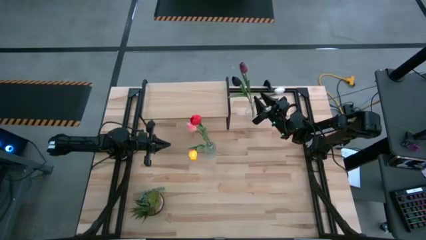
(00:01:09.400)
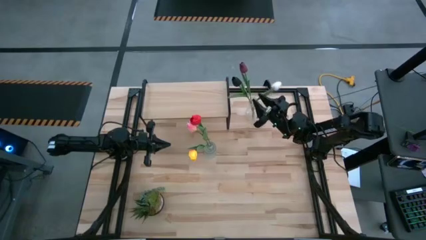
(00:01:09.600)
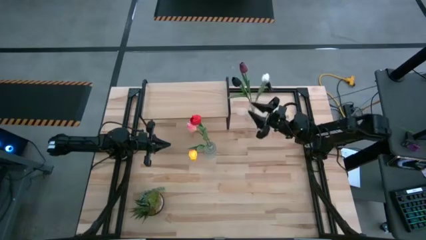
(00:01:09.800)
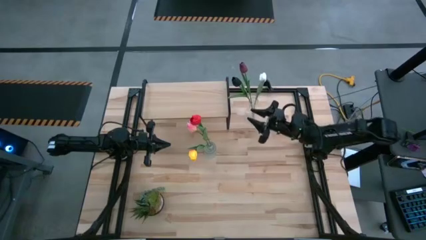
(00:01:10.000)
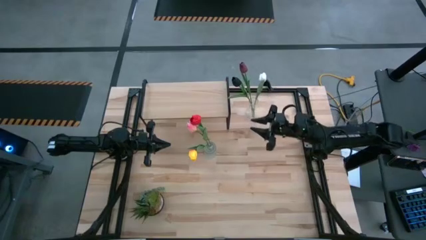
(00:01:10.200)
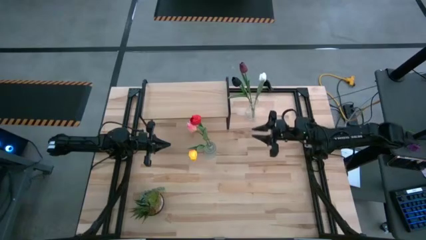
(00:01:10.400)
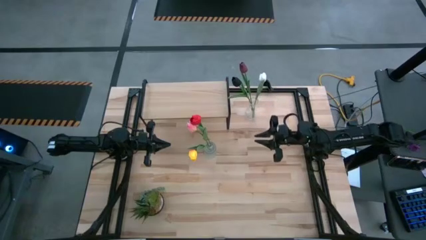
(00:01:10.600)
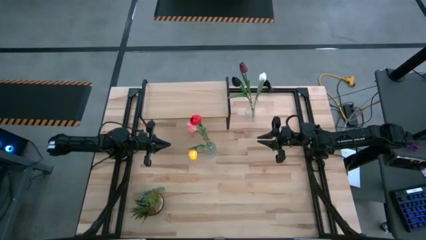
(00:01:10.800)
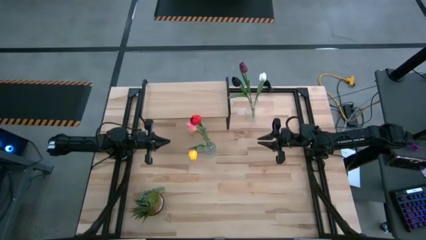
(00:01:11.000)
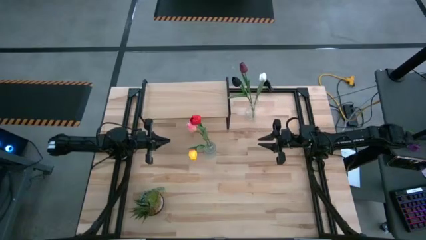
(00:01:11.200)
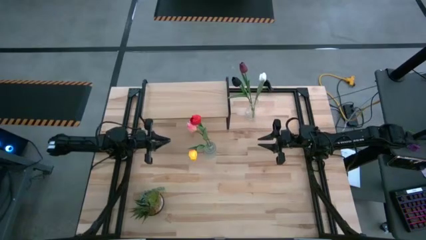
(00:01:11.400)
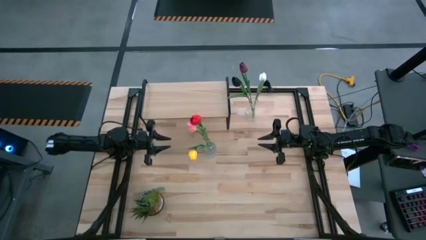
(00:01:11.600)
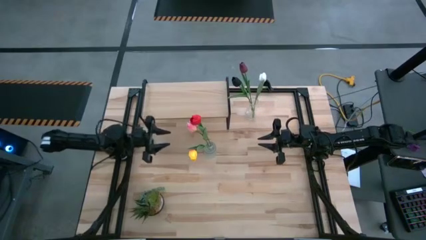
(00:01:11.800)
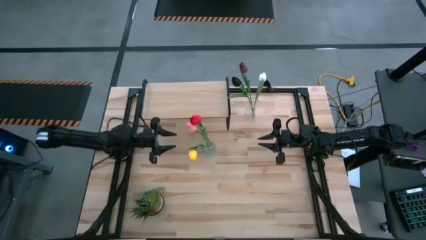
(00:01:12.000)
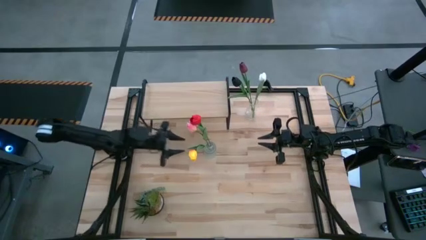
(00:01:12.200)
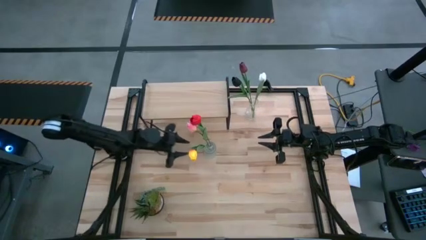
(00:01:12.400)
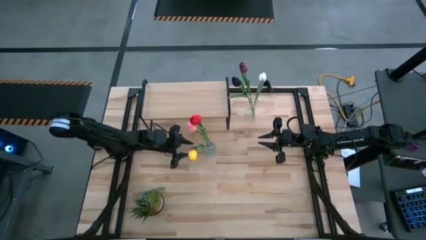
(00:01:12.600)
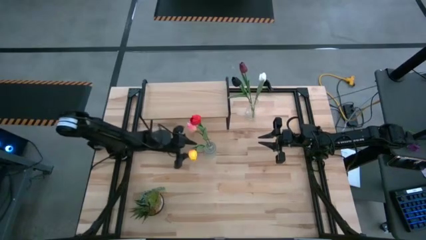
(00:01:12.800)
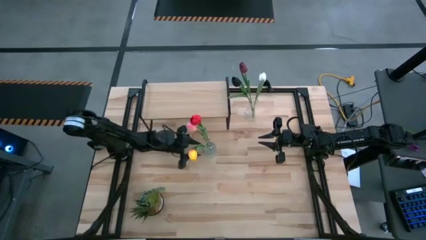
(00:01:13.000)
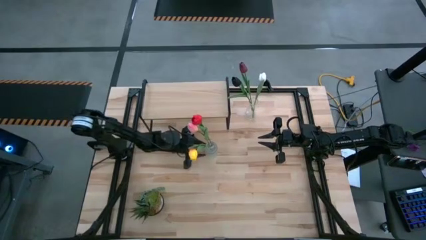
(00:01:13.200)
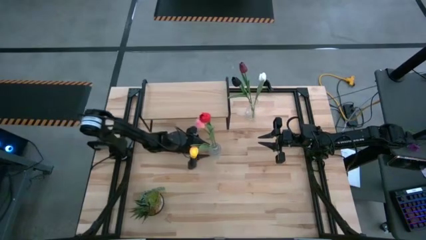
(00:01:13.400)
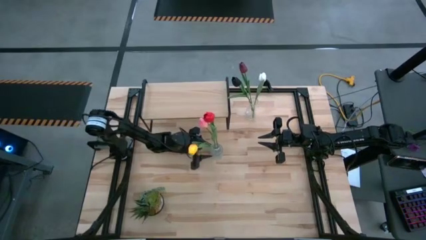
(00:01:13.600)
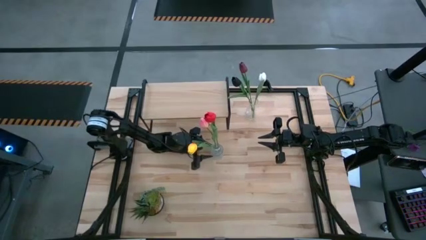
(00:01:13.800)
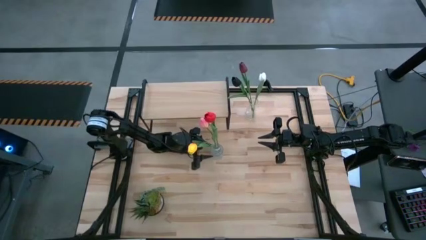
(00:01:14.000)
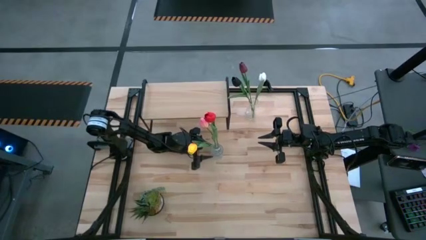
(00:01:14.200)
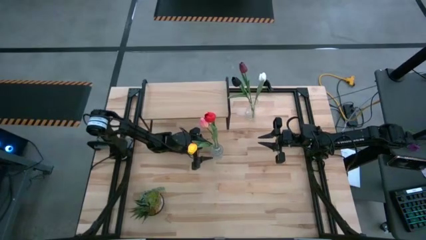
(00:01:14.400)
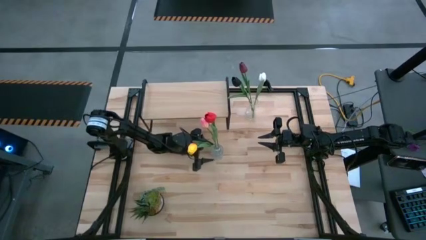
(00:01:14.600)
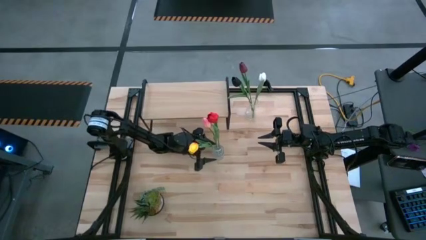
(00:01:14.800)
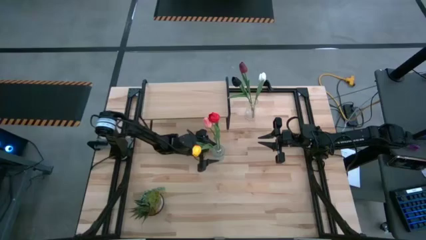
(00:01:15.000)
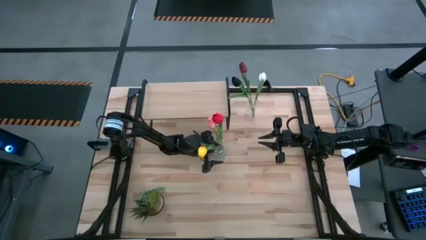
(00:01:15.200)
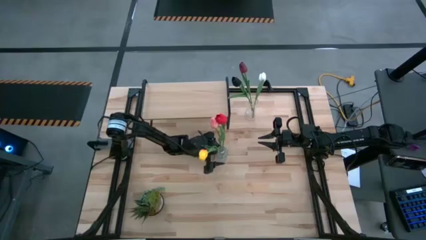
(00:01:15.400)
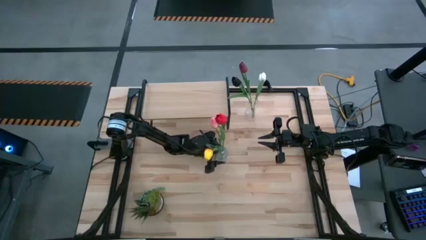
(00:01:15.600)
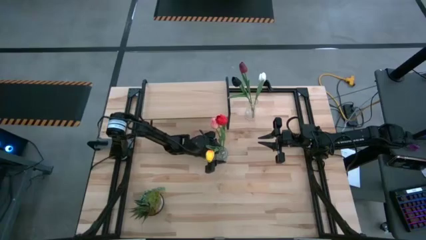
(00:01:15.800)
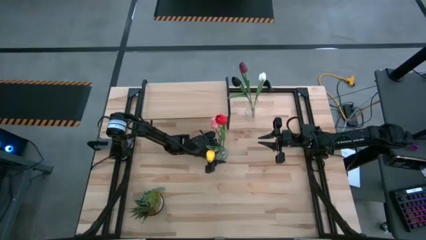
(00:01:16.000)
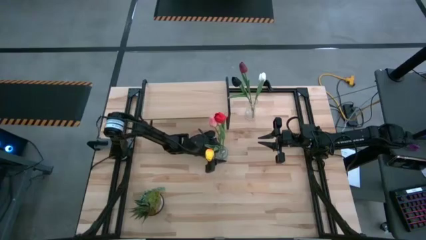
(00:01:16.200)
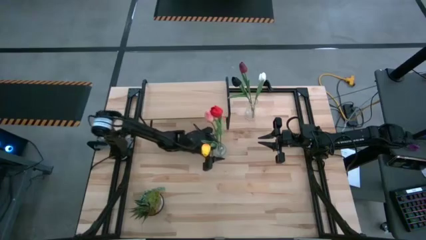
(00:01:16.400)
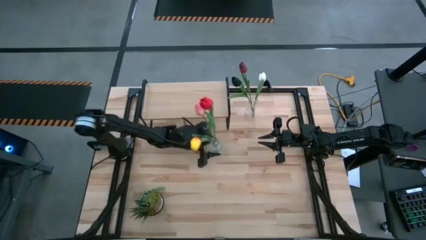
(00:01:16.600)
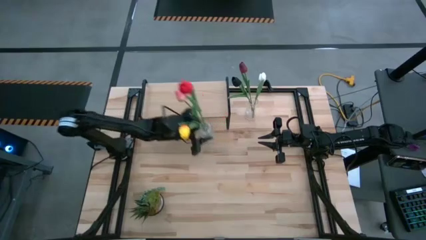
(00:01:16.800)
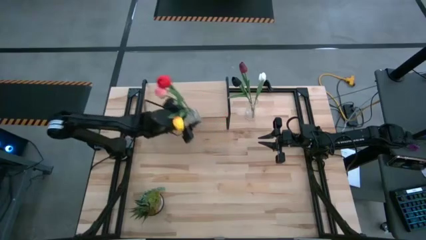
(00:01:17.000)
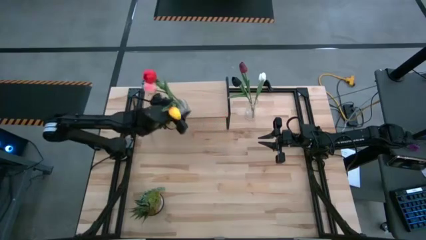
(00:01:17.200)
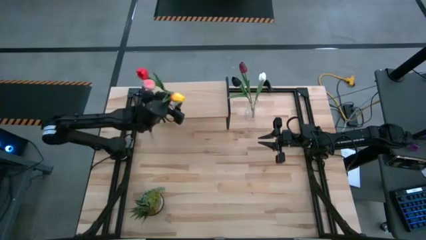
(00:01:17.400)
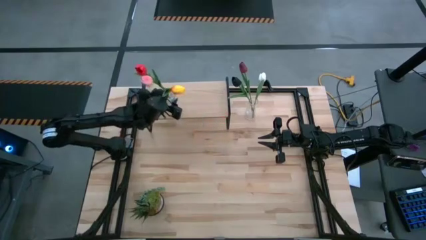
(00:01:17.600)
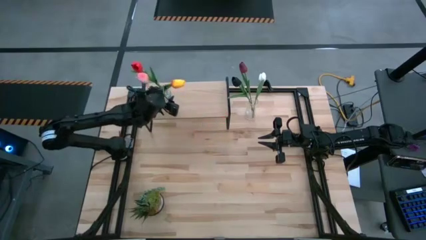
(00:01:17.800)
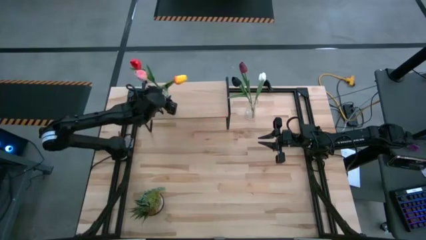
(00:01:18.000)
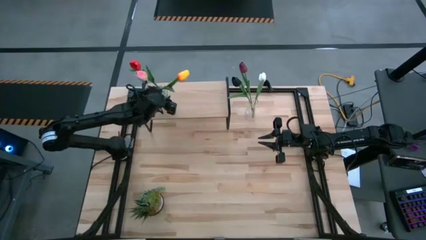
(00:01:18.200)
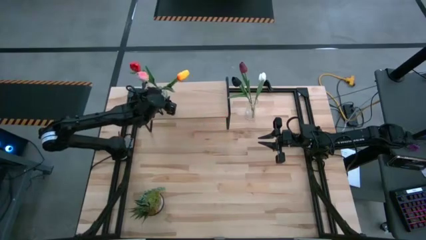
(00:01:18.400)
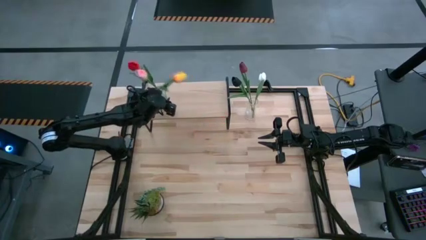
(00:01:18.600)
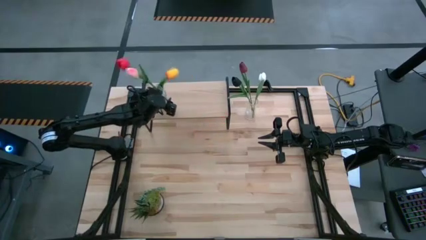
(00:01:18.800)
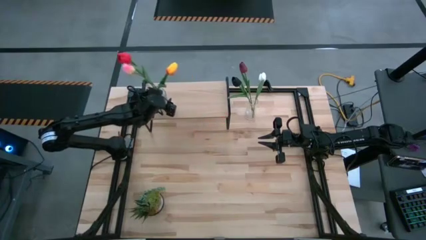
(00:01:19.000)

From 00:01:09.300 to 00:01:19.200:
Task: Pick and place flowers into a vace then onto a shelf
Put the bottom transparent vase with the tulips on the shelf

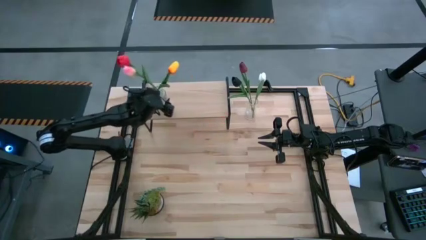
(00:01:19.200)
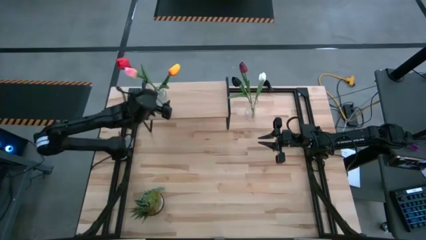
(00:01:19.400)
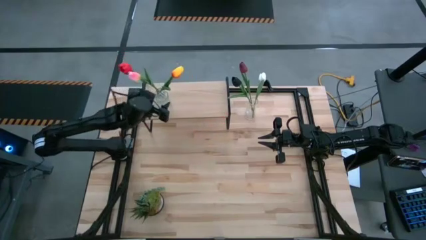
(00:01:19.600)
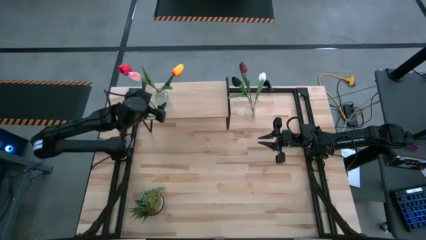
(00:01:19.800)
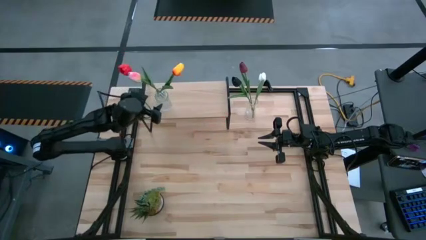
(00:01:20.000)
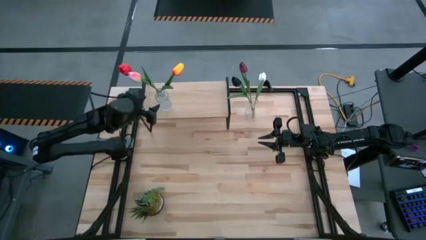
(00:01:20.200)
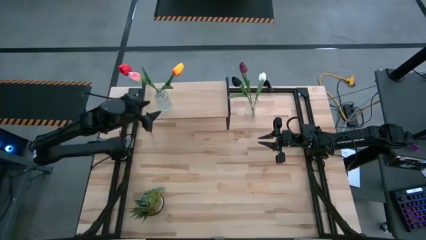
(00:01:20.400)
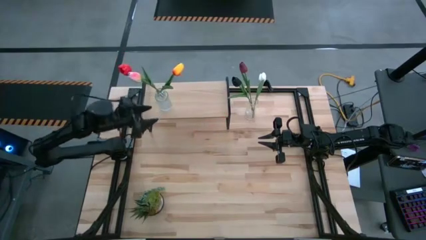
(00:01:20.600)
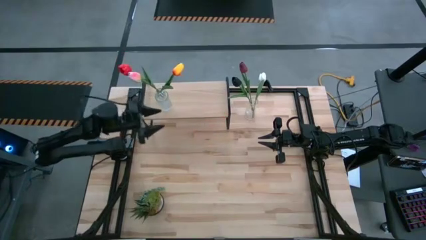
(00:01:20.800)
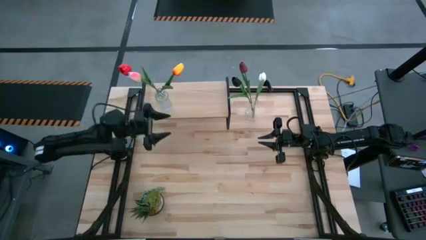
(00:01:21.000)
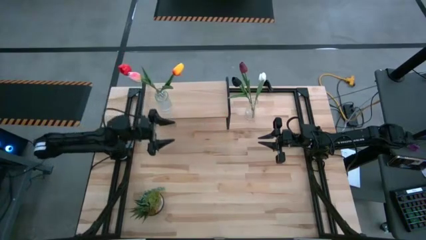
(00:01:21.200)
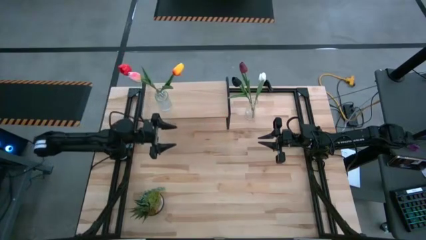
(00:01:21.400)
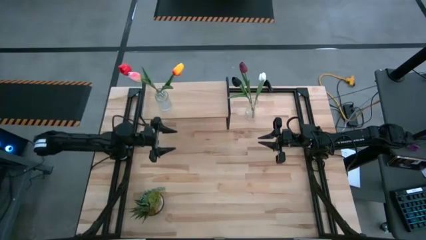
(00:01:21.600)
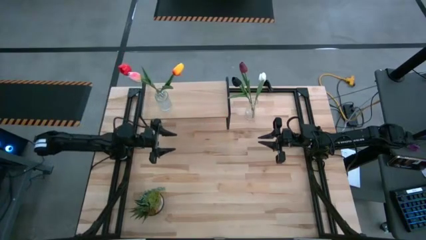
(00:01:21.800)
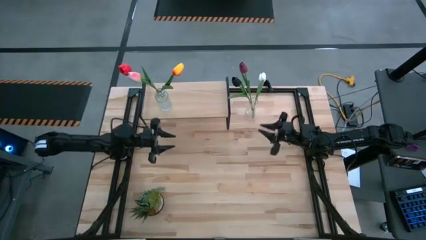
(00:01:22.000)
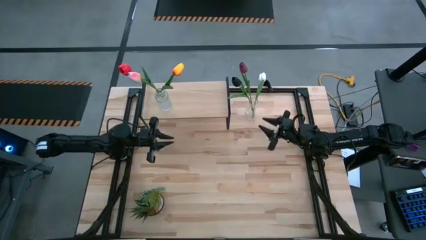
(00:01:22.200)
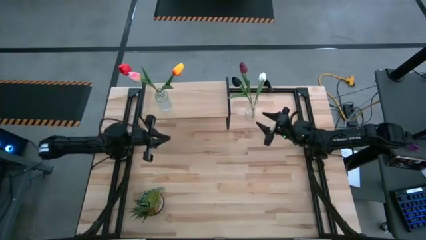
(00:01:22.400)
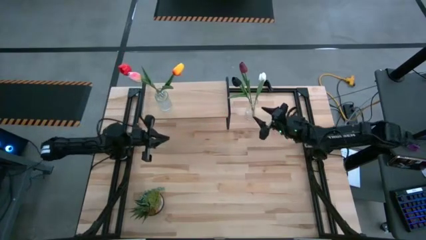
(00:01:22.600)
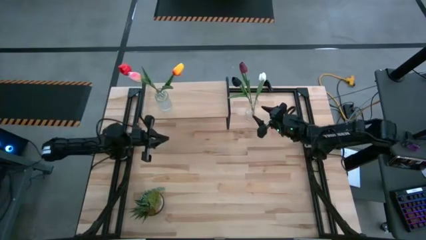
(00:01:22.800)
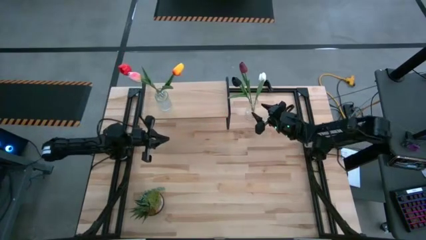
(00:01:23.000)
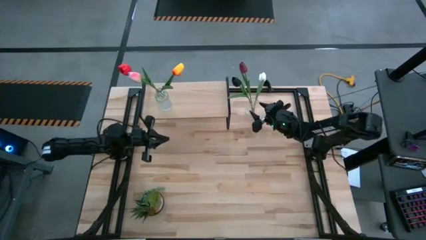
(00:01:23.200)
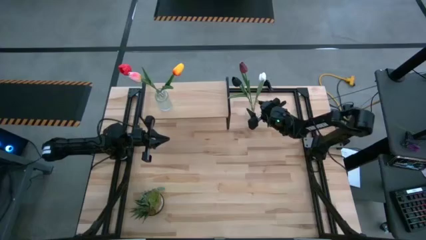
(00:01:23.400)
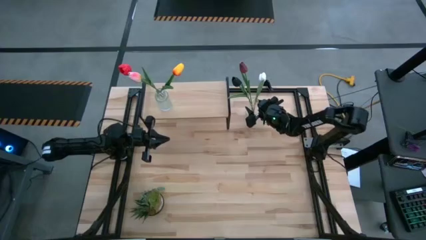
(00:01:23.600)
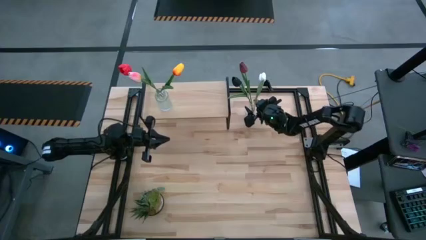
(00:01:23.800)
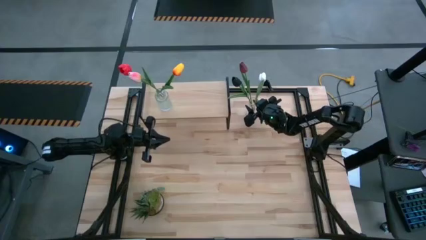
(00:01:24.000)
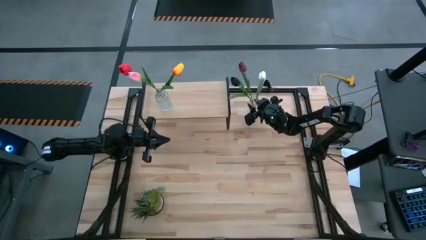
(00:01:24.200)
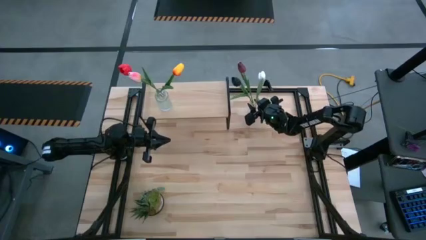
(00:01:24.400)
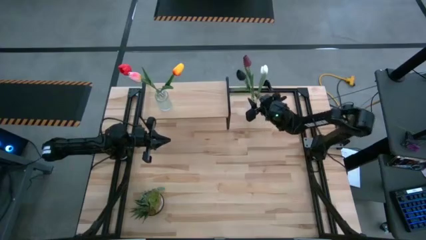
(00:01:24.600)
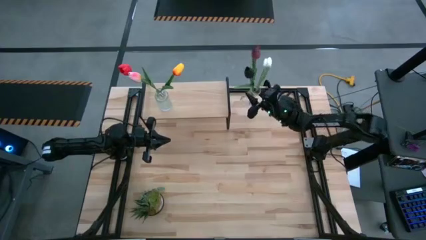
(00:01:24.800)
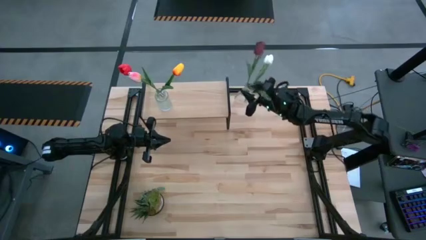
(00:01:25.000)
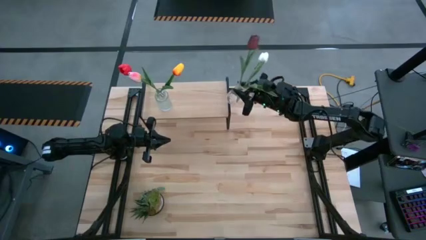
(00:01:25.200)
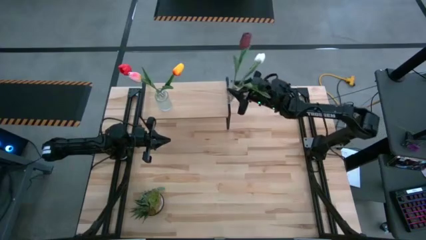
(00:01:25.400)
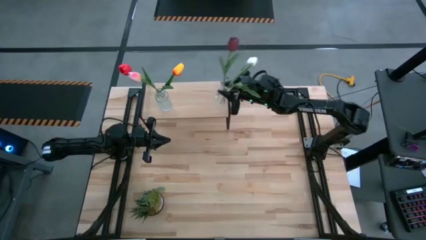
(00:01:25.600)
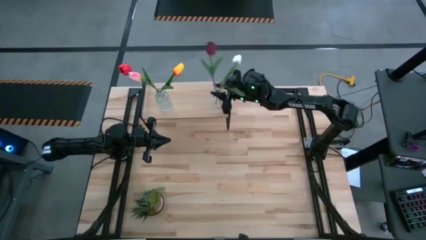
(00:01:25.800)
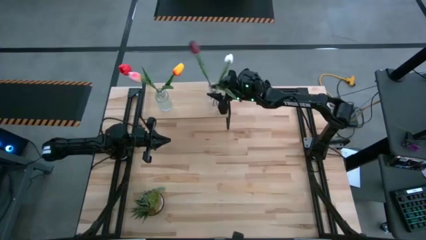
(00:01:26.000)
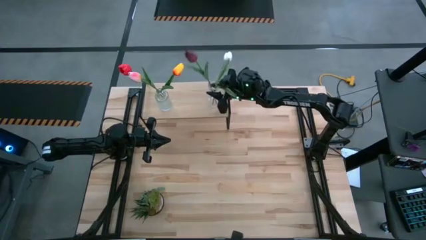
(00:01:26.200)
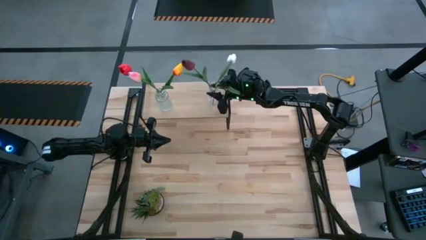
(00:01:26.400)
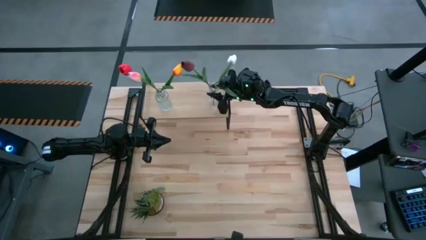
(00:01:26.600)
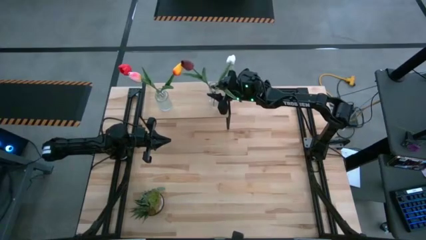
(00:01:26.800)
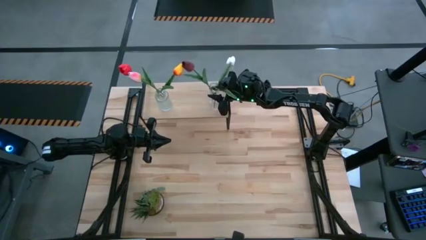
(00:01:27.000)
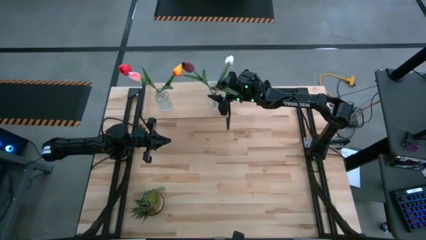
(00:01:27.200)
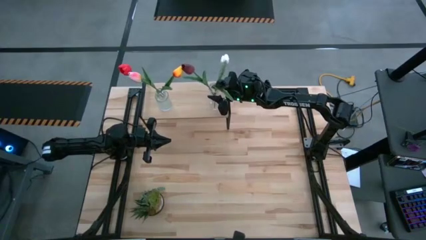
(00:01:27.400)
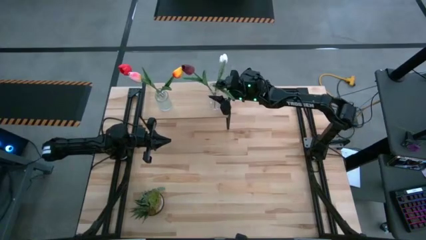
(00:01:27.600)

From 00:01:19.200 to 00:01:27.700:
Put the transparent vase with the tulips on the shelf
